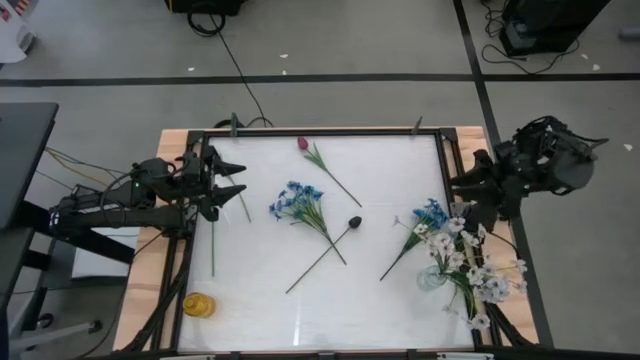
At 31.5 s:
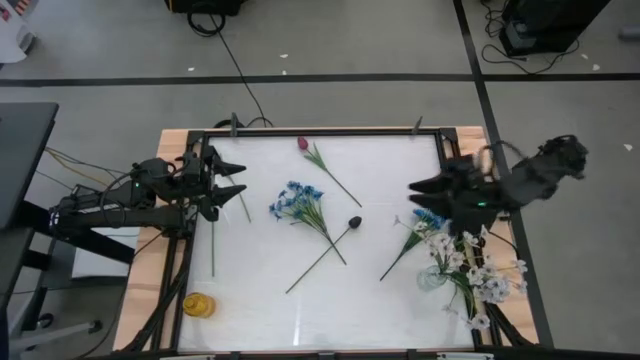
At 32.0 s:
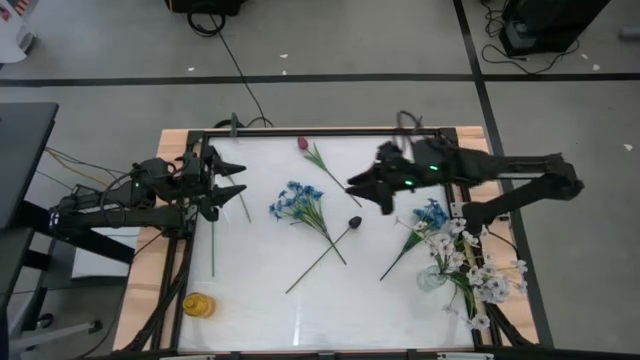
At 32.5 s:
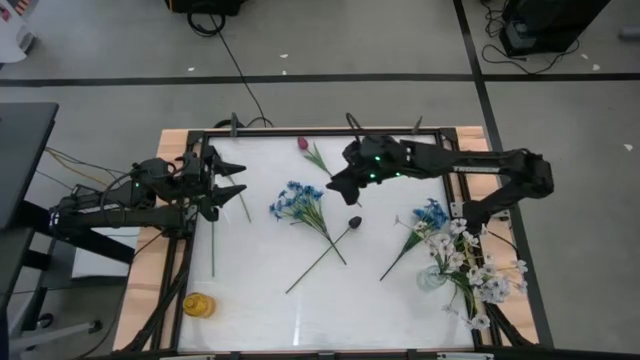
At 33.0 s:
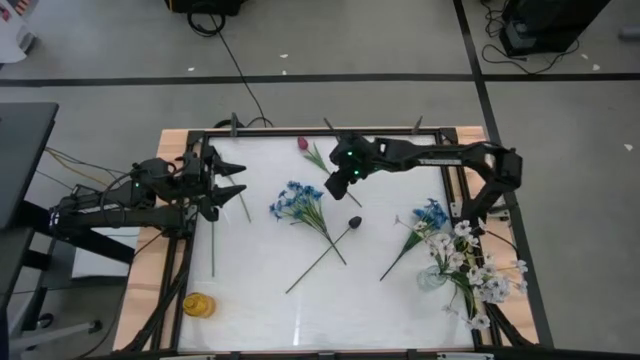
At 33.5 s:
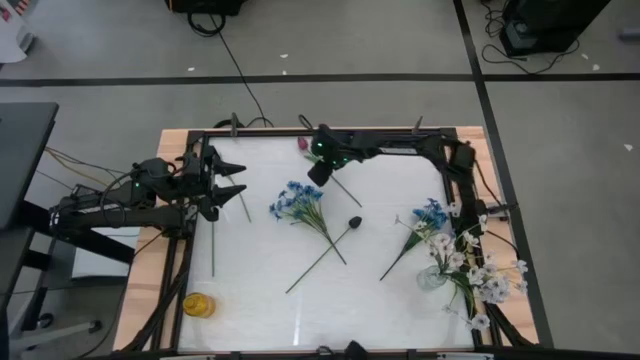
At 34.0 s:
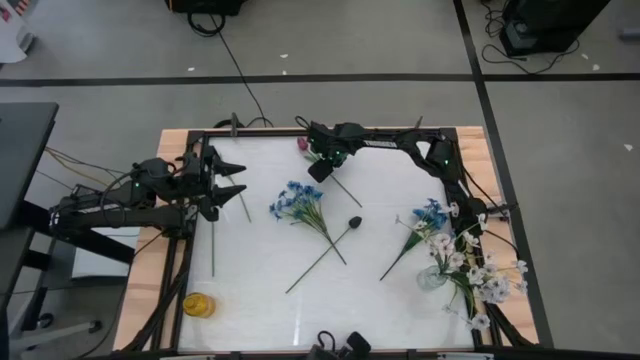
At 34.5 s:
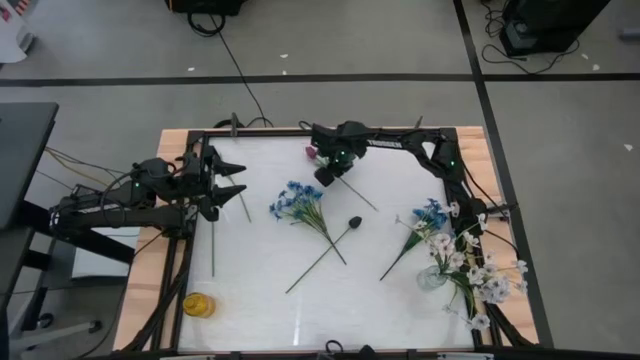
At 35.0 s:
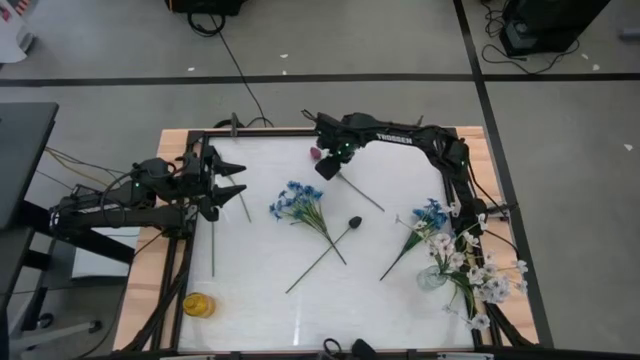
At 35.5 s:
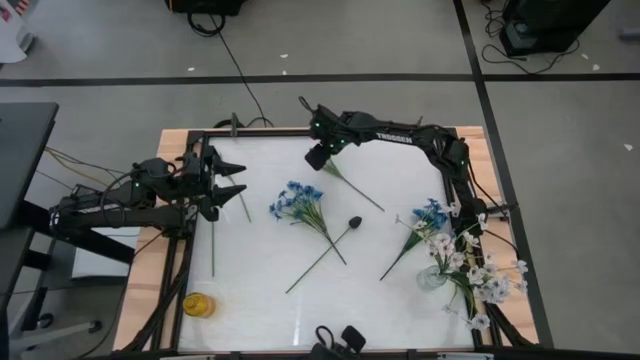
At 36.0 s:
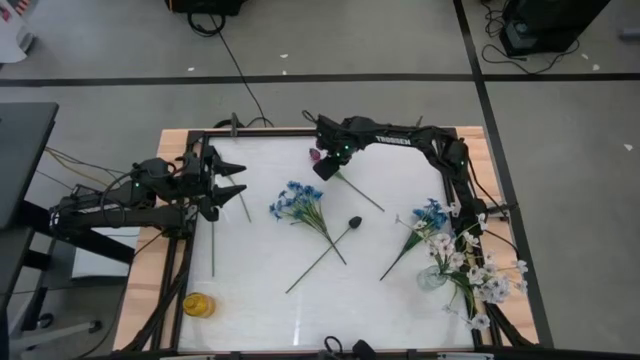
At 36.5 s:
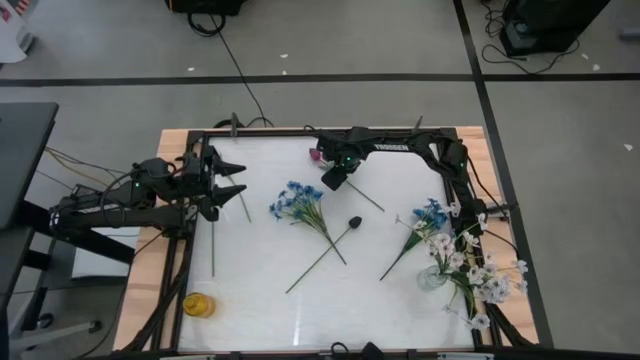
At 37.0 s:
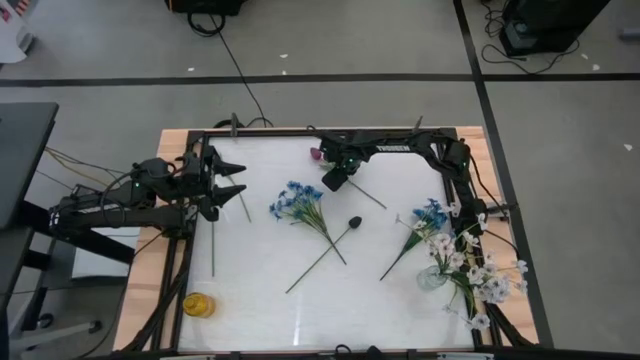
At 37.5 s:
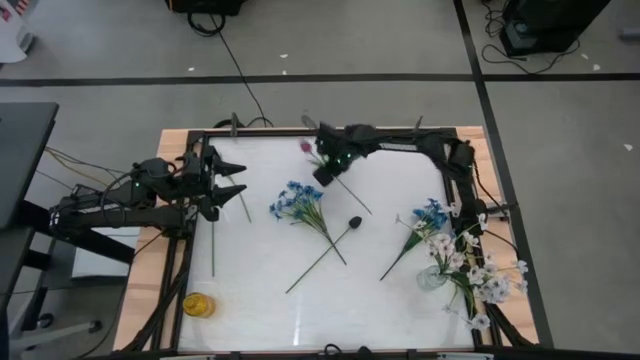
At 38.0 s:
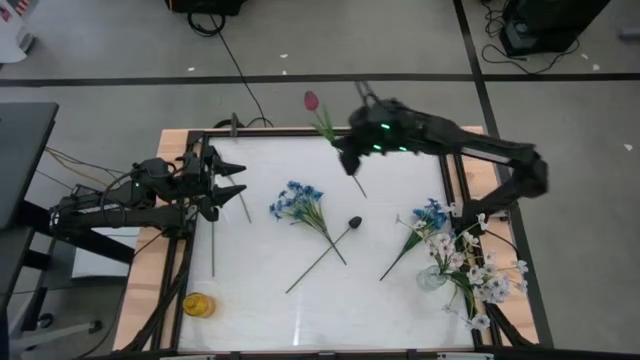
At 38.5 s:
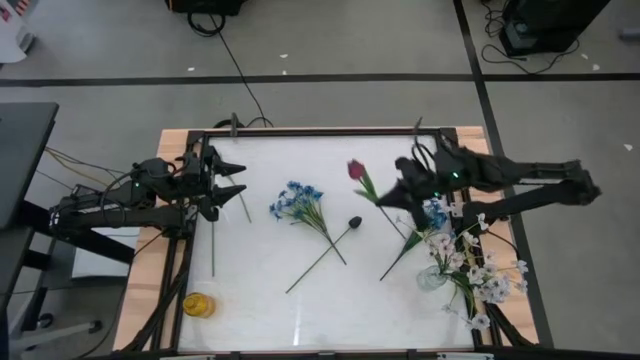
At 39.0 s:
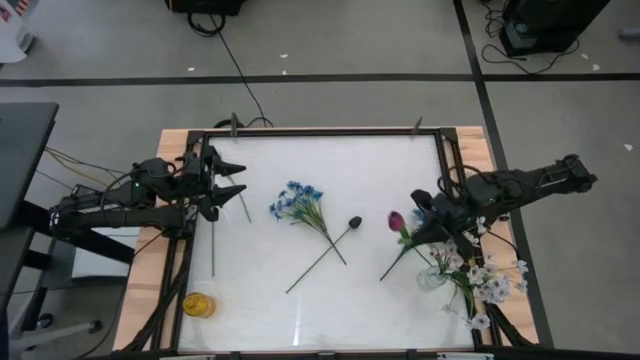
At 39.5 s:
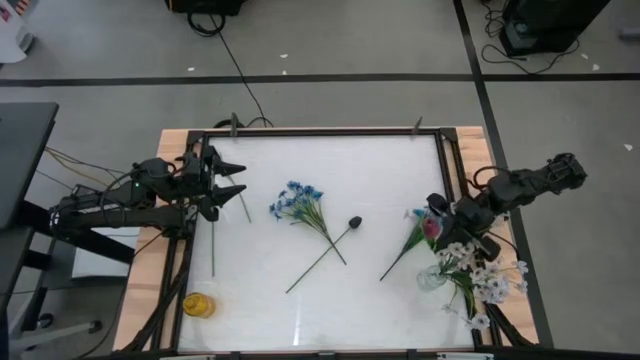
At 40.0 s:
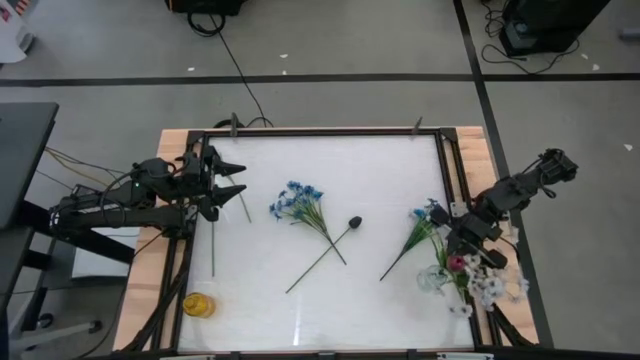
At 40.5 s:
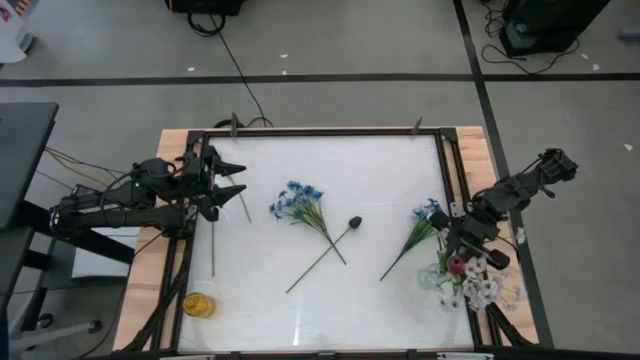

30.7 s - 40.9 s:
Task: Sort flowers into vase by color
Put the right red tulip into the transparent vase

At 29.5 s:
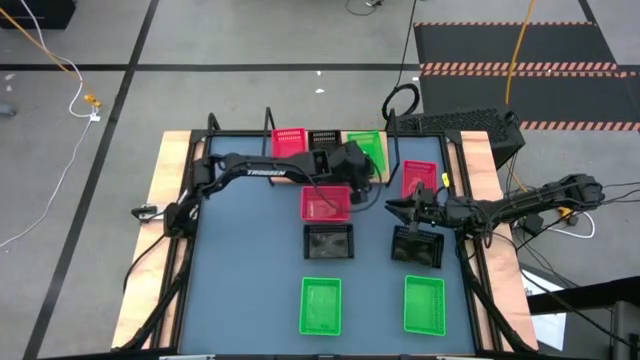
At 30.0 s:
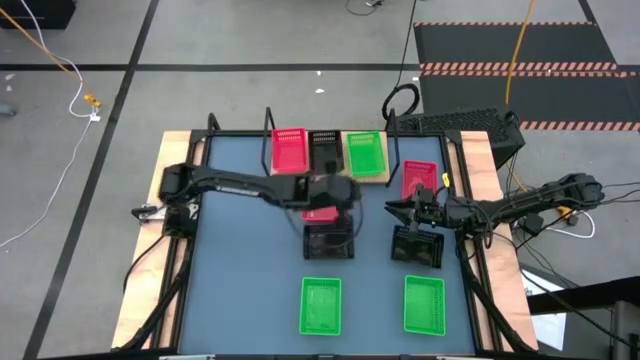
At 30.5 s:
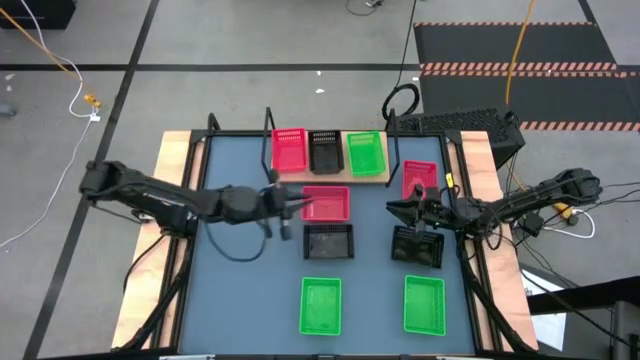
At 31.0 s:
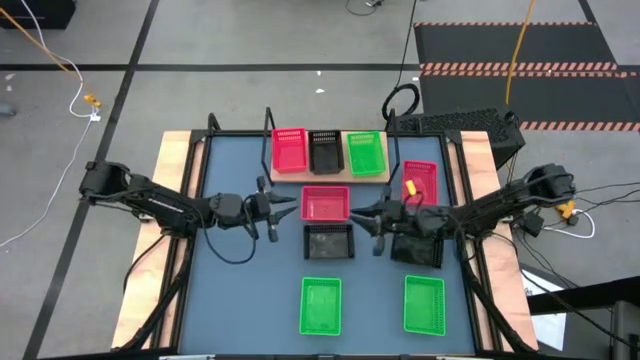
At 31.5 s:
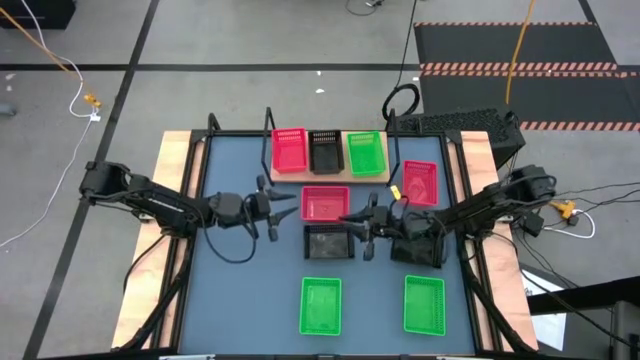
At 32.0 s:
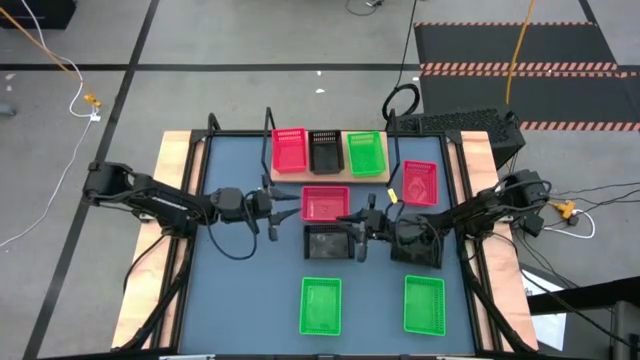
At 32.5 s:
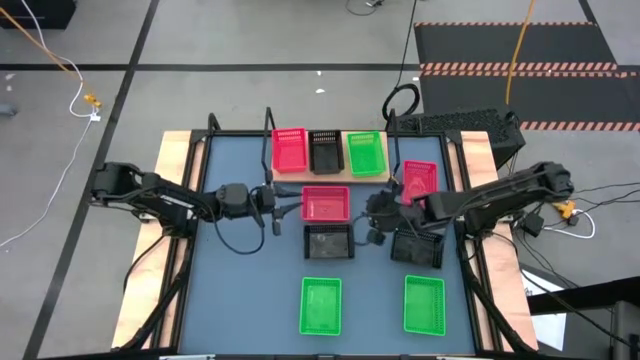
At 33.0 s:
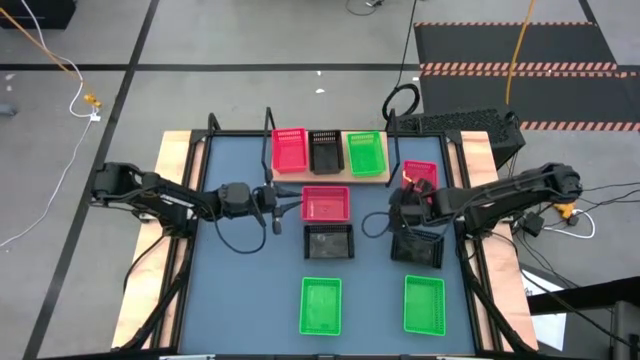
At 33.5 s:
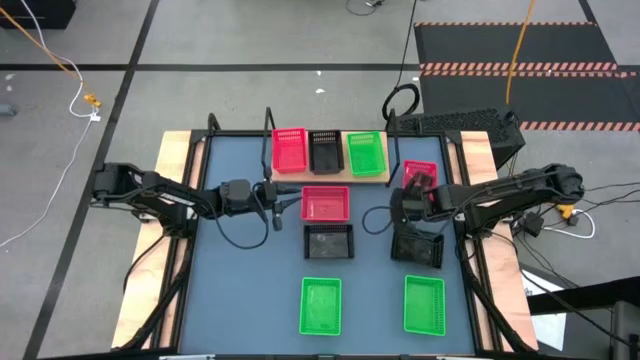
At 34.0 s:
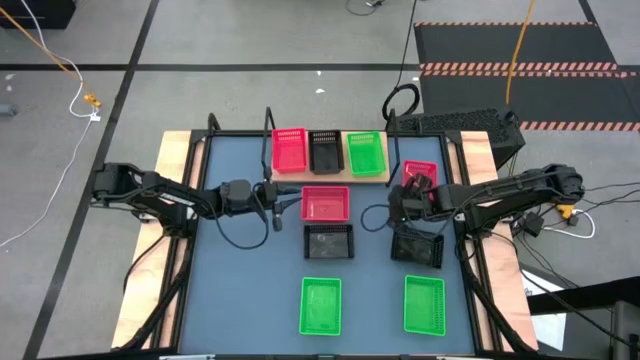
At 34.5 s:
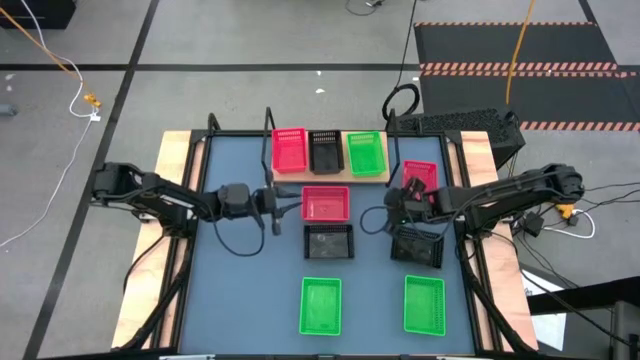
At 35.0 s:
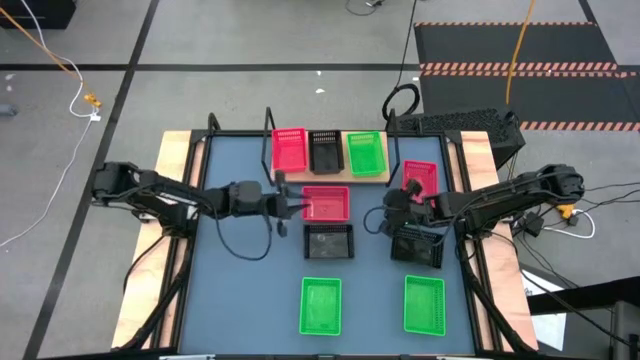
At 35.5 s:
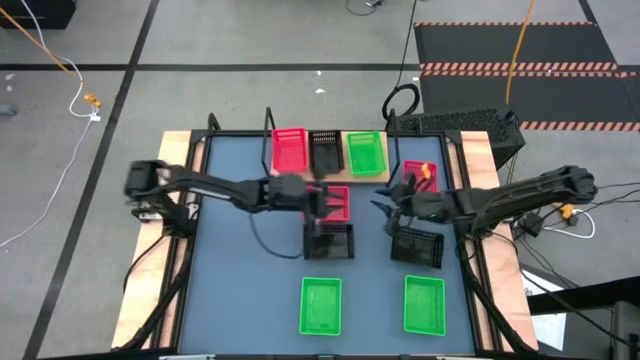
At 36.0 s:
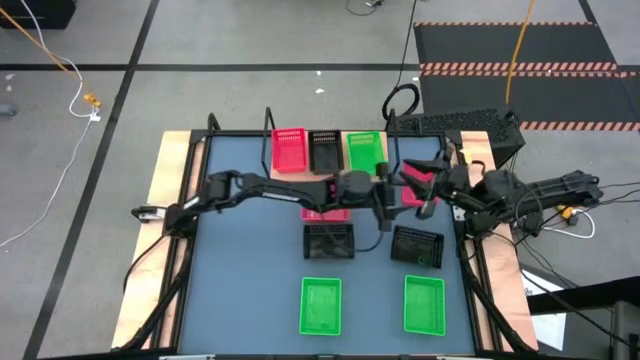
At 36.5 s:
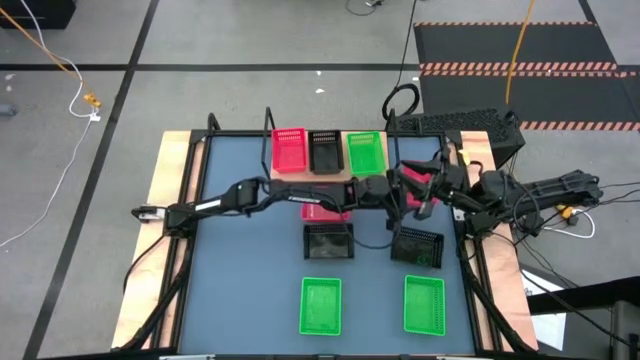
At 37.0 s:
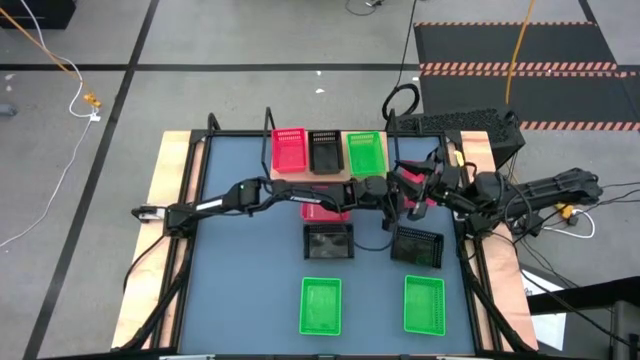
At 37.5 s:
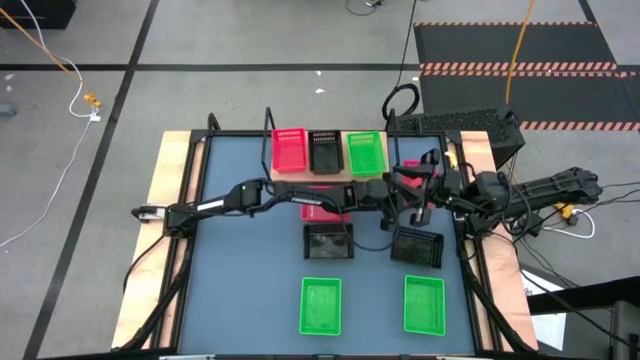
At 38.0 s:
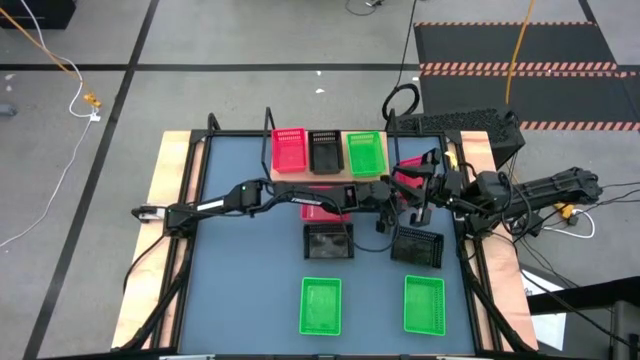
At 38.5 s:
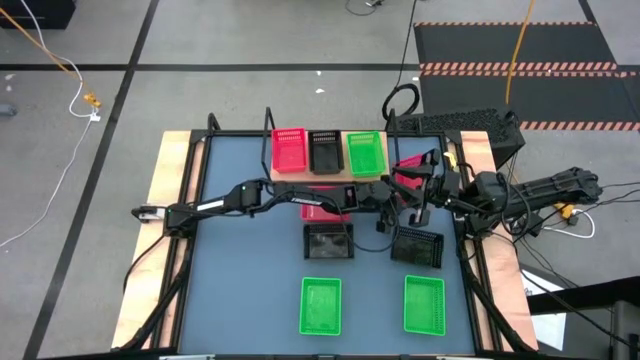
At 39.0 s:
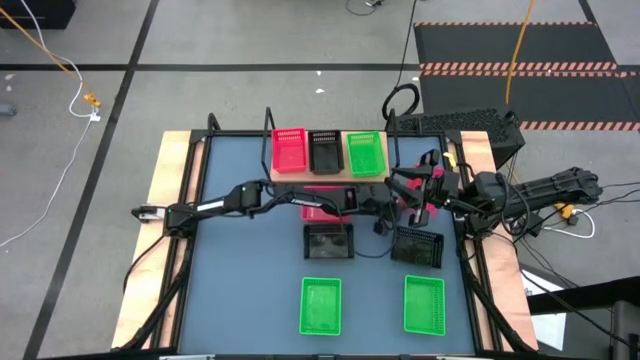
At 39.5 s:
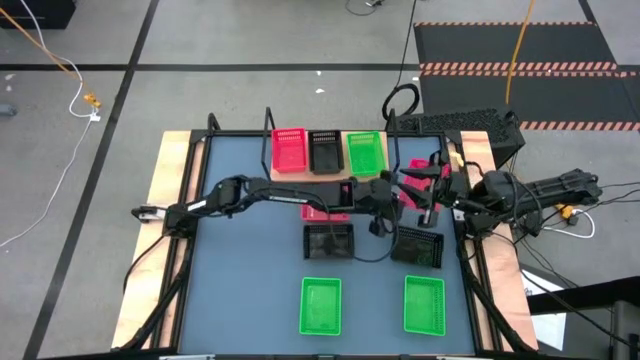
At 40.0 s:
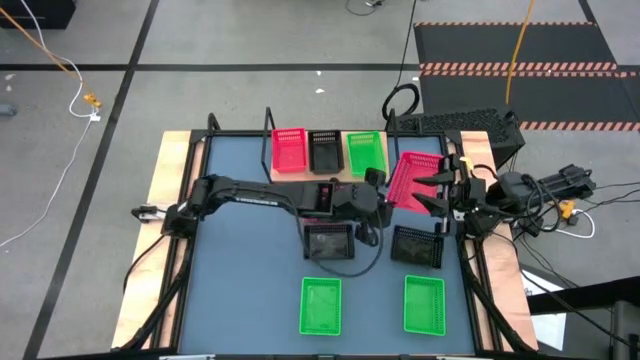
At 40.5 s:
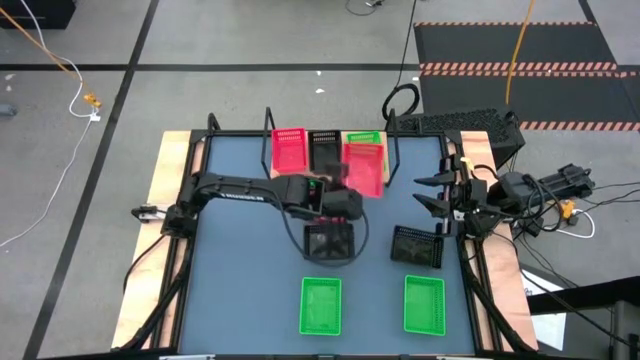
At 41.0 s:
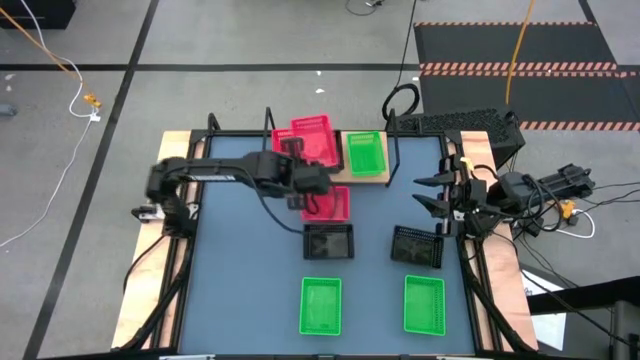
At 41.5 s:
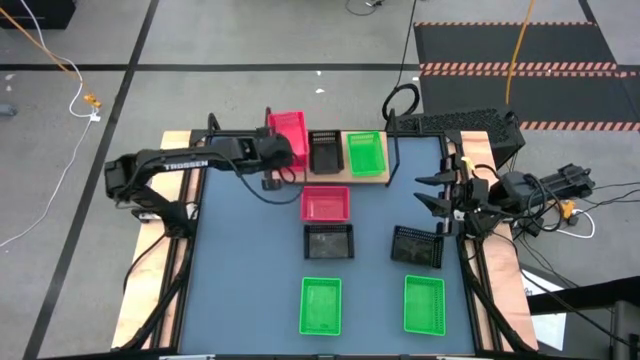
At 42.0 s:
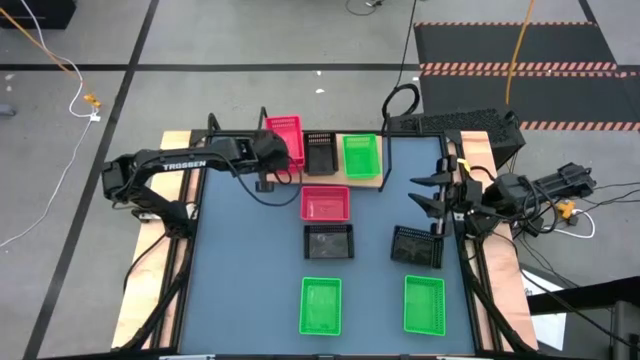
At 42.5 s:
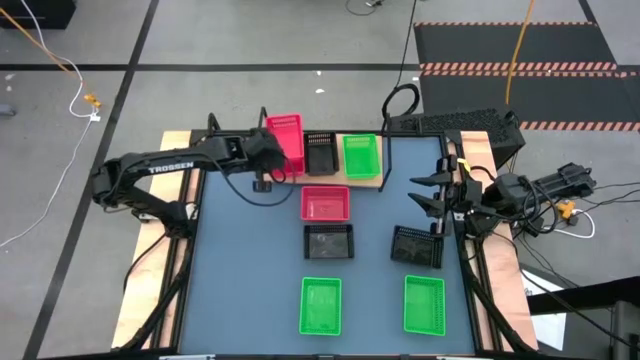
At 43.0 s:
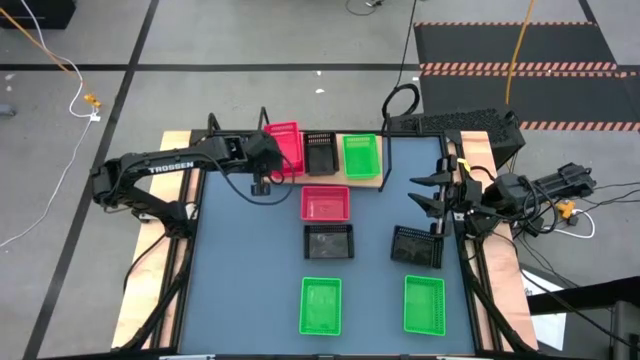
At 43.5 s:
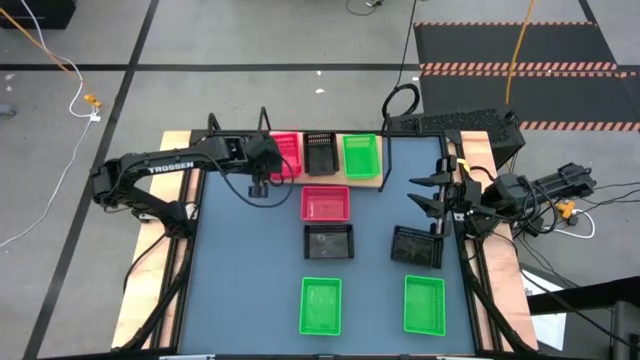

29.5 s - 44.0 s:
Task: Stack baskets on shelf by color
Stack the right red basket on the red basket on the shelf
